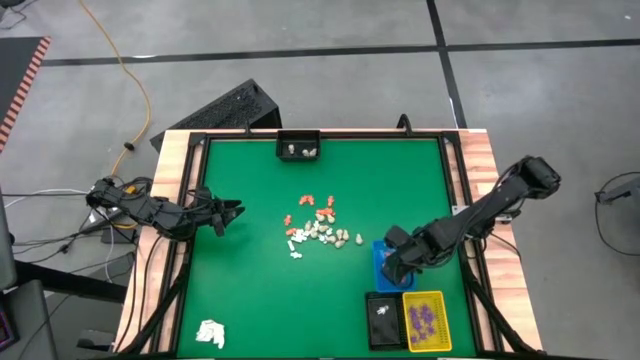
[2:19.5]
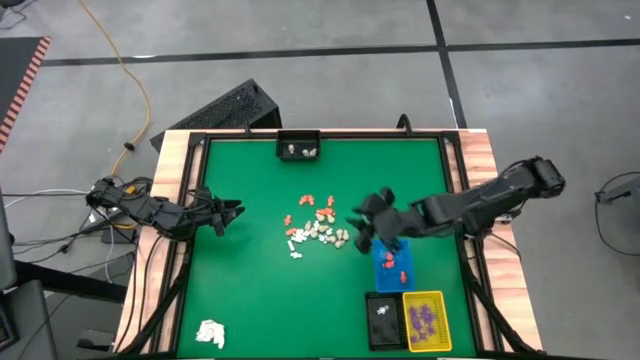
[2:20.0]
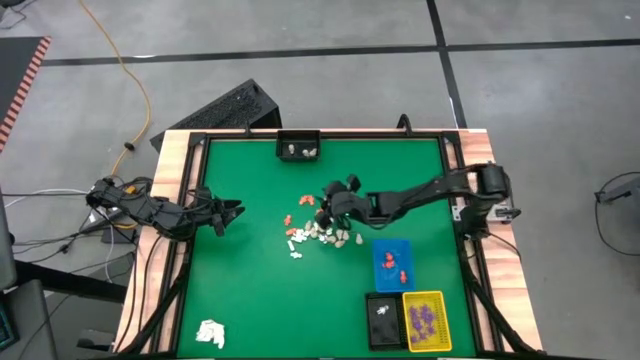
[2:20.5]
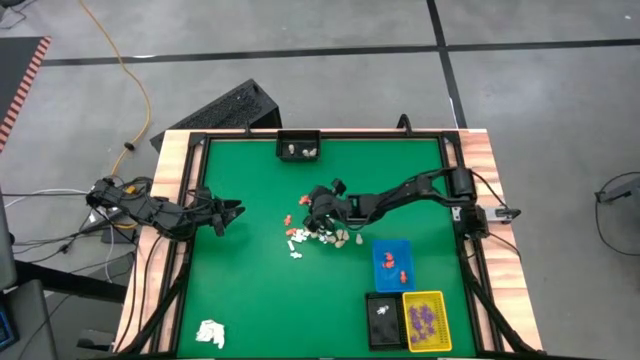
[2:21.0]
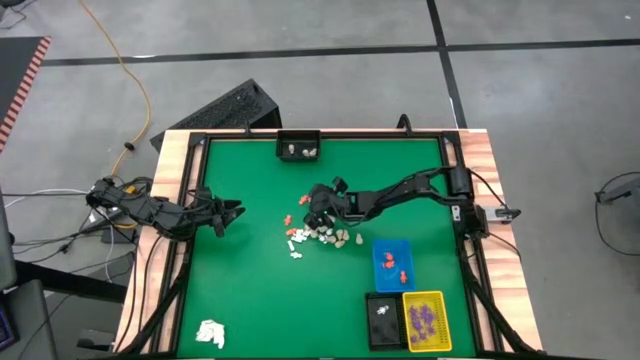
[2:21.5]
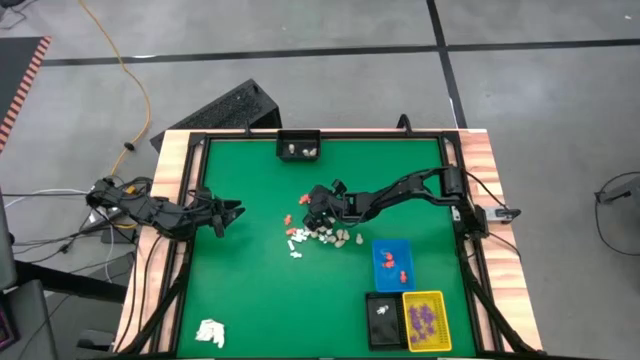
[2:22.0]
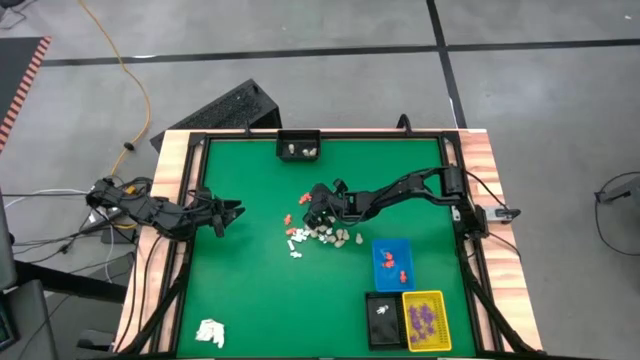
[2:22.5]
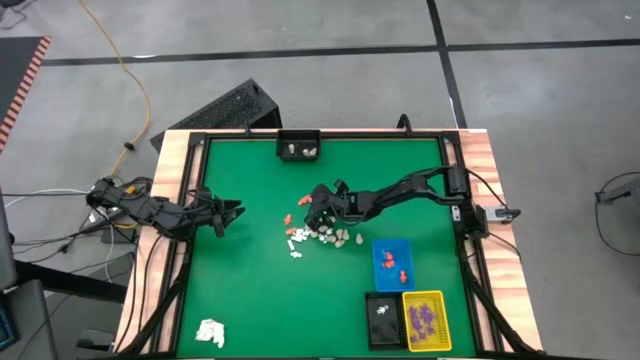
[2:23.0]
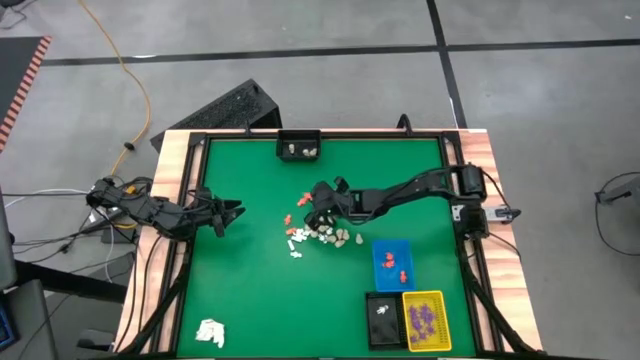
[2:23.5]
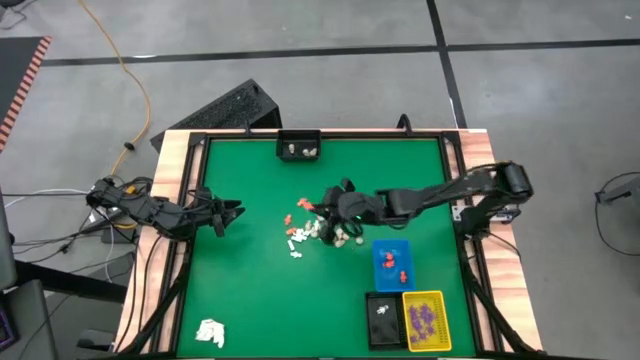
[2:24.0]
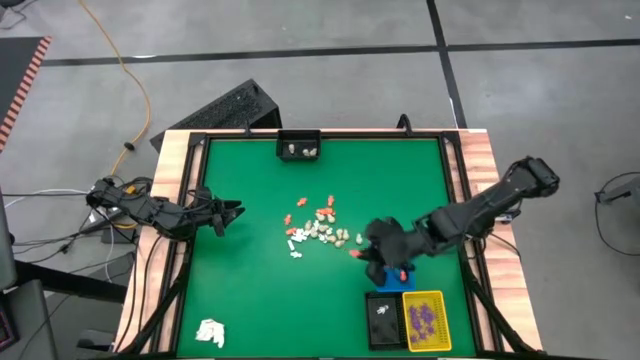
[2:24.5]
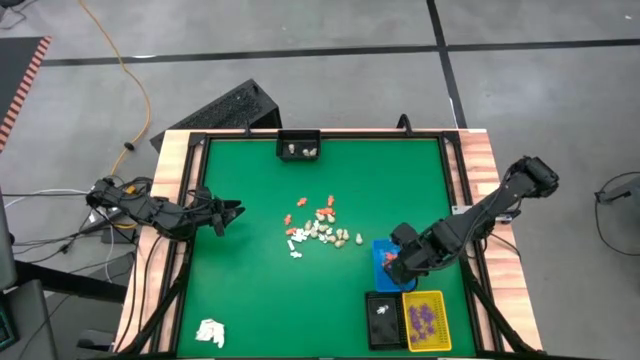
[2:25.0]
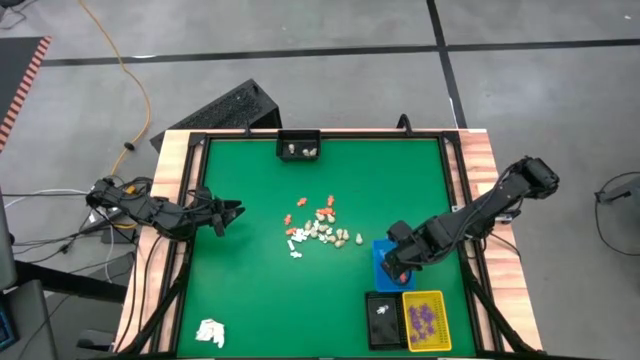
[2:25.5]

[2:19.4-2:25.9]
Task: Sort Halloween decoration
Put the orange skeleton toy into the blue bin

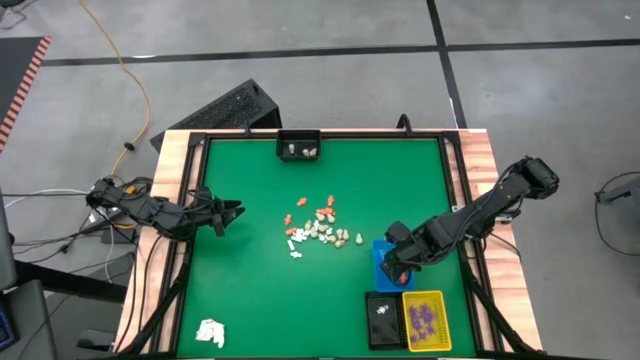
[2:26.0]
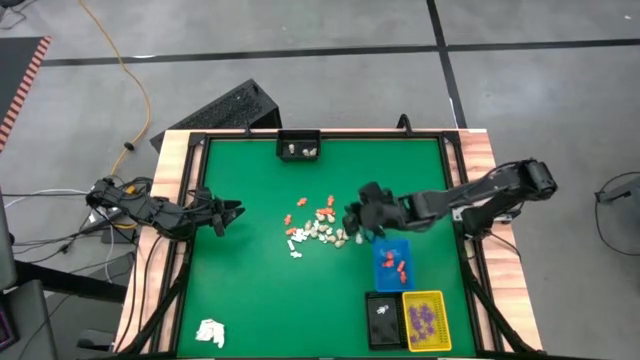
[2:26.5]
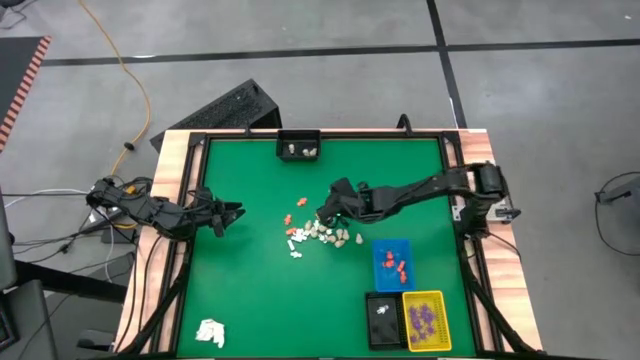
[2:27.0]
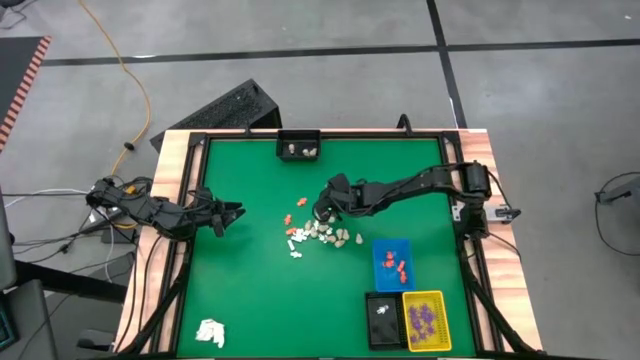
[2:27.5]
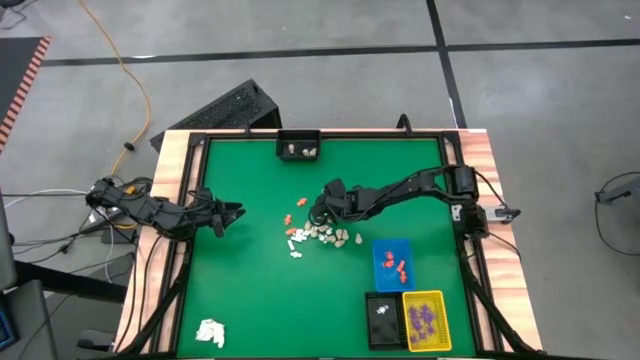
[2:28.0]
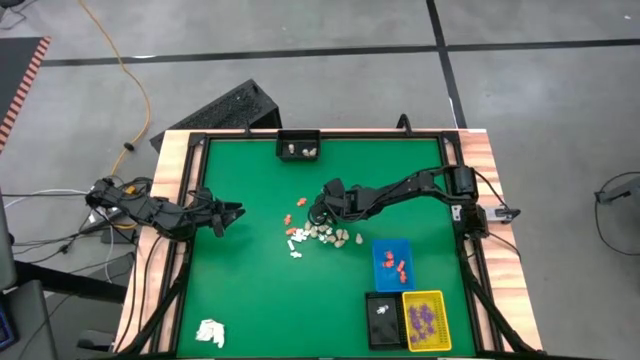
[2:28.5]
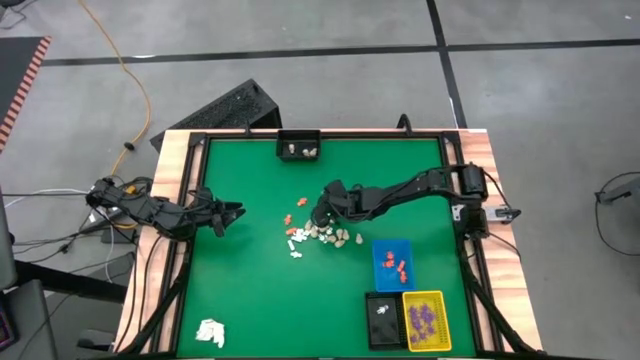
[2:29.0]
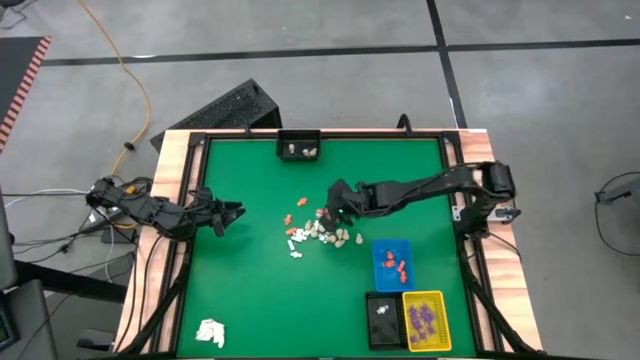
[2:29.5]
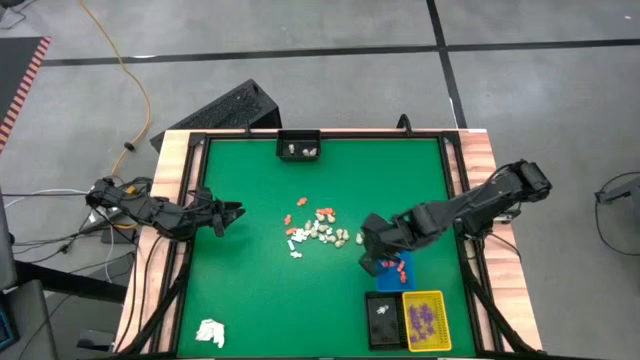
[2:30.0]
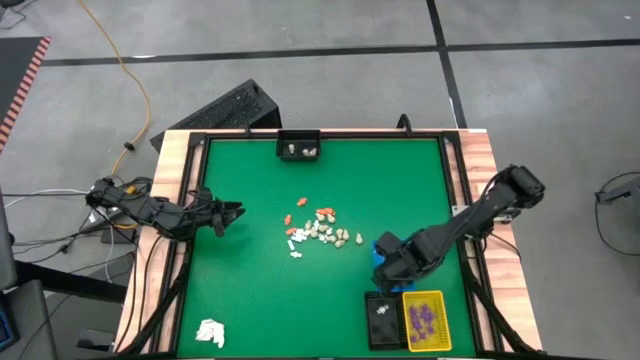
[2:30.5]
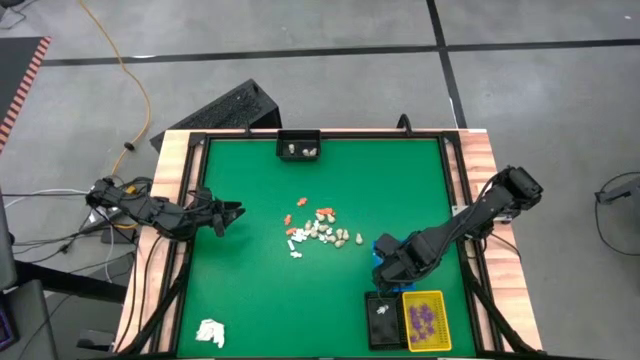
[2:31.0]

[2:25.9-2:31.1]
Put the orange skeleton toy into the blue bin

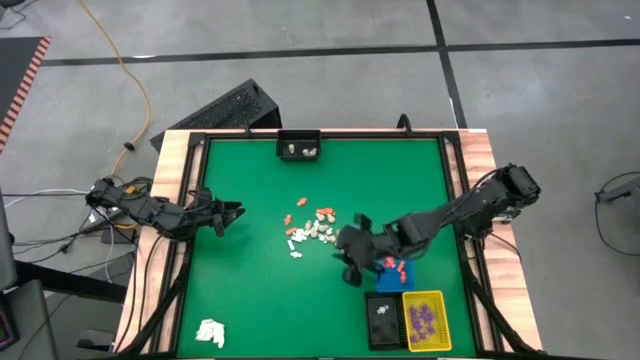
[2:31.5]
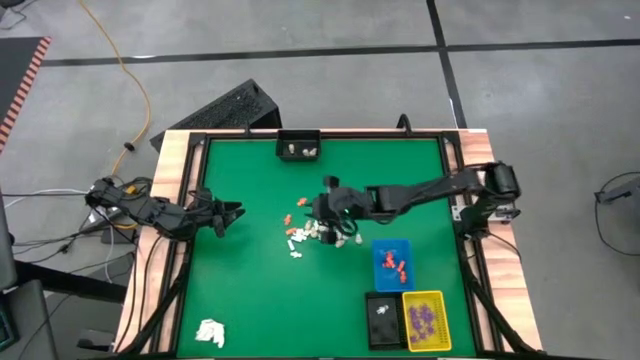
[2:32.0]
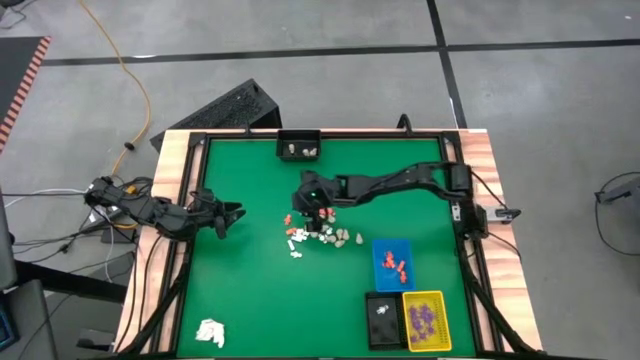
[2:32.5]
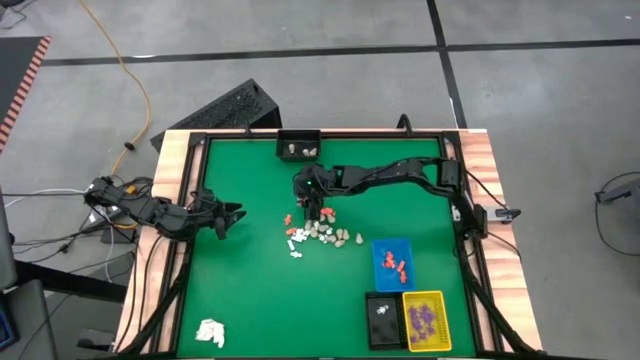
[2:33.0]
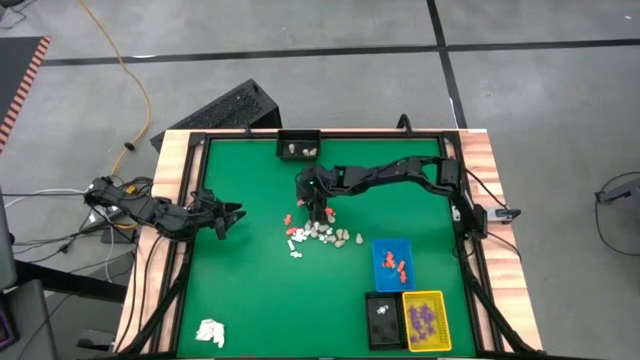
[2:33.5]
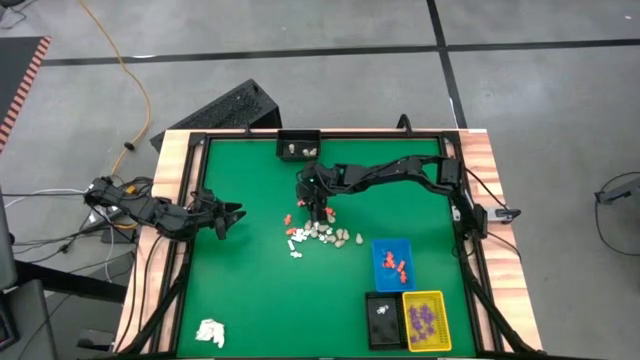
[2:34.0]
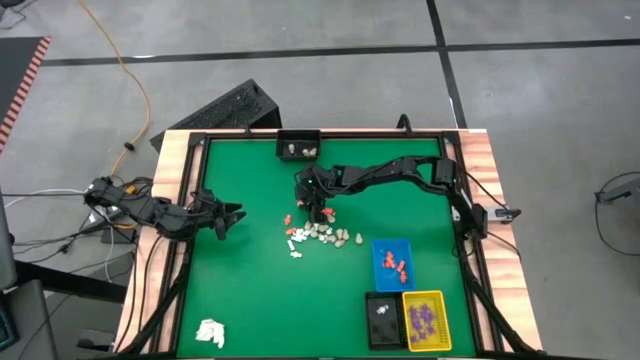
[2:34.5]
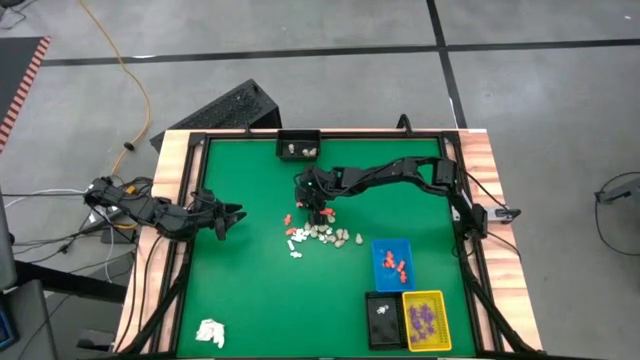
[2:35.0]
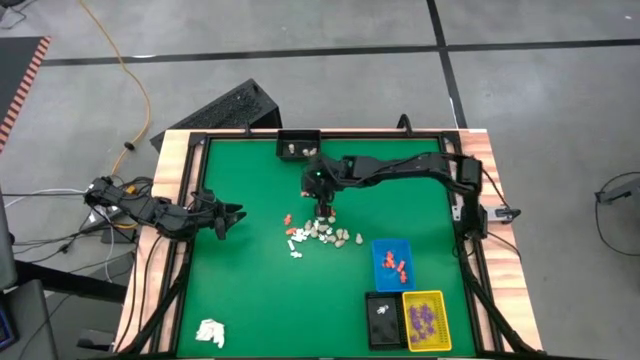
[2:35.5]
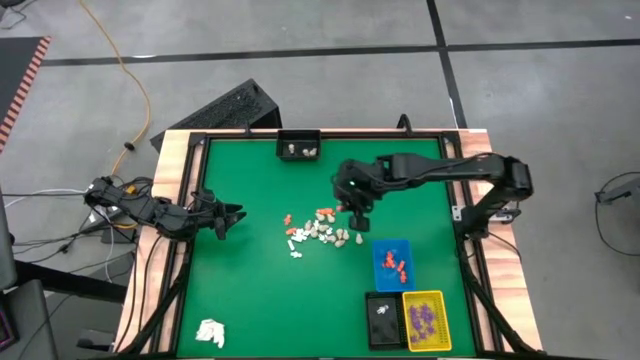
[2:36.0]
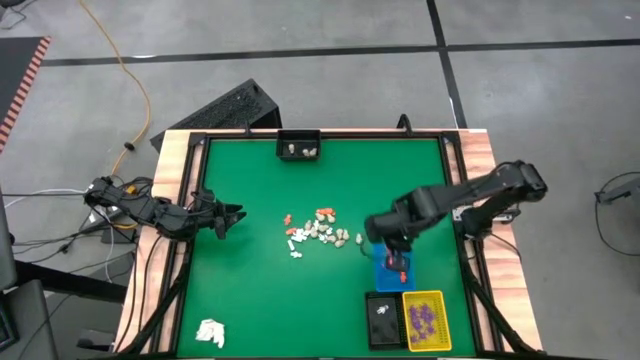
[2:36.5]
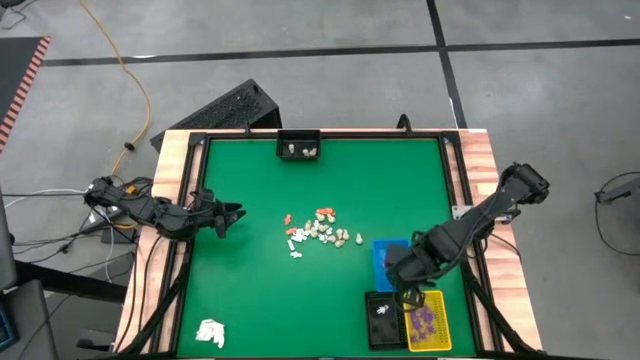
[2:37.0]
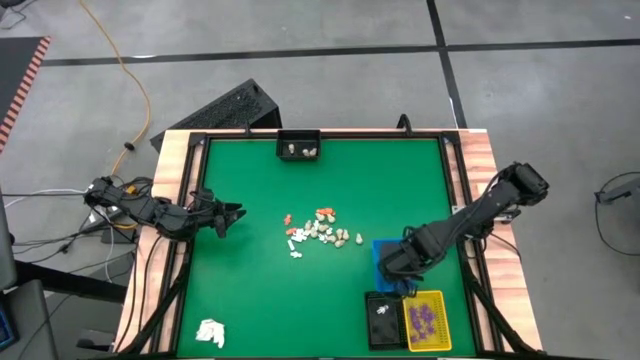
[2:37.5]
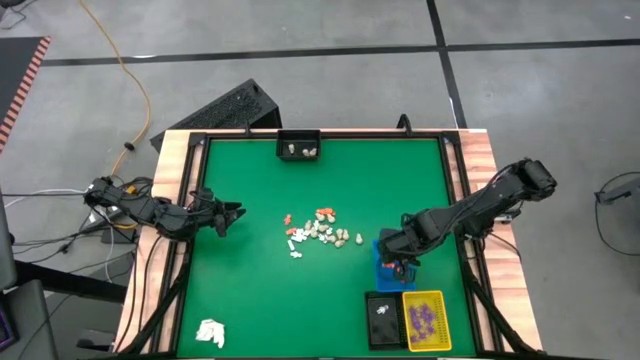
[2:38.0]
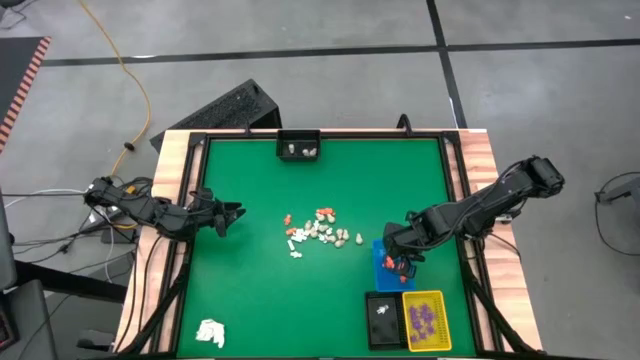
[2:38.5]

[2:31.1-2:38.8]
Put the orange skeleton toy into the blue bin

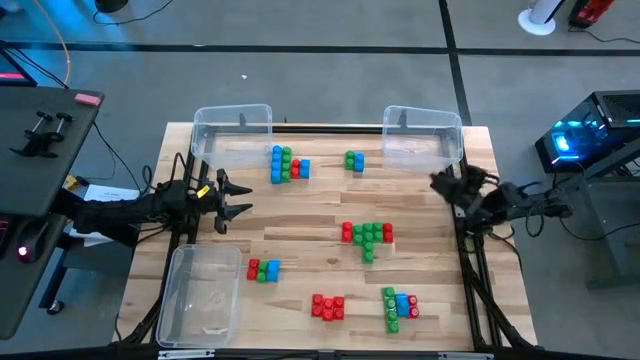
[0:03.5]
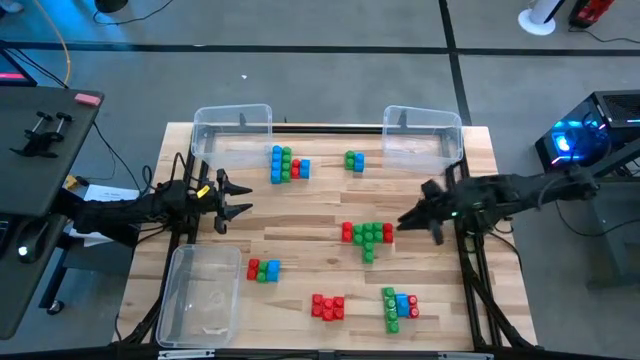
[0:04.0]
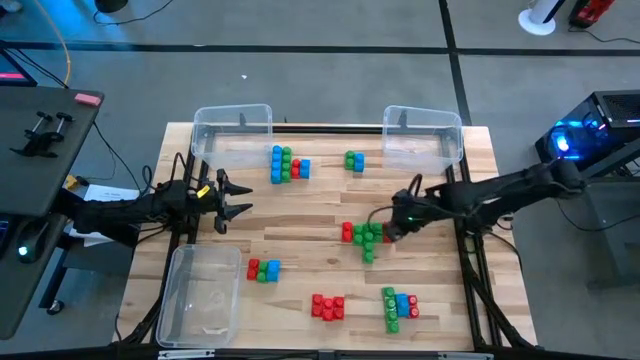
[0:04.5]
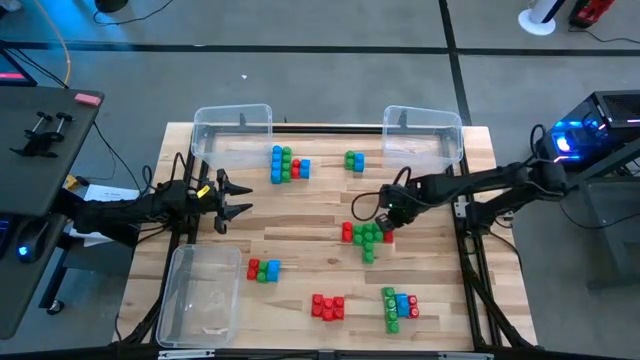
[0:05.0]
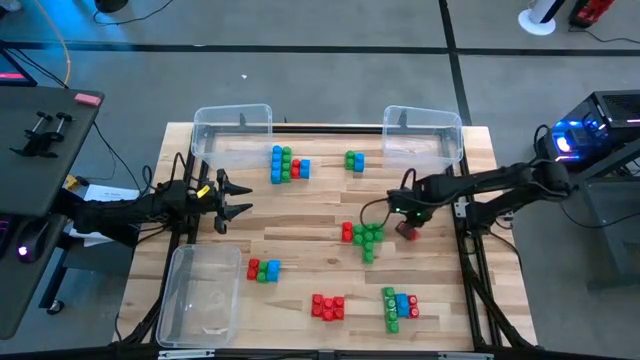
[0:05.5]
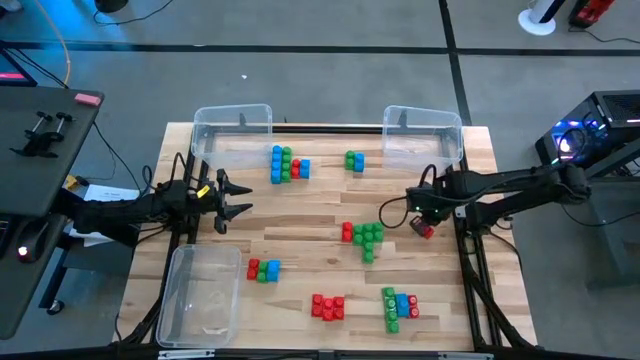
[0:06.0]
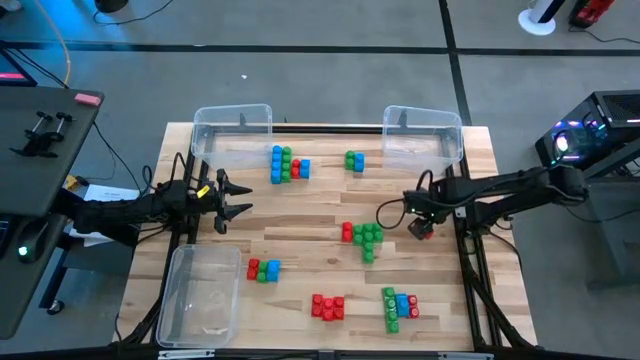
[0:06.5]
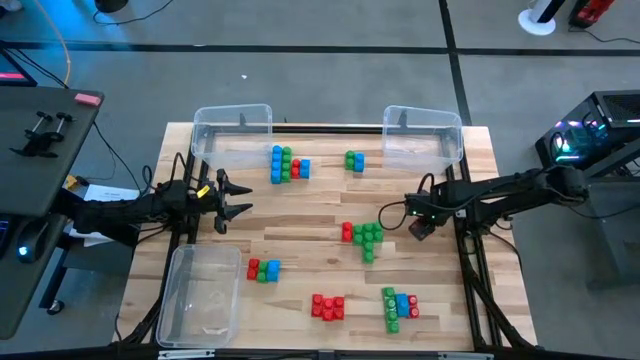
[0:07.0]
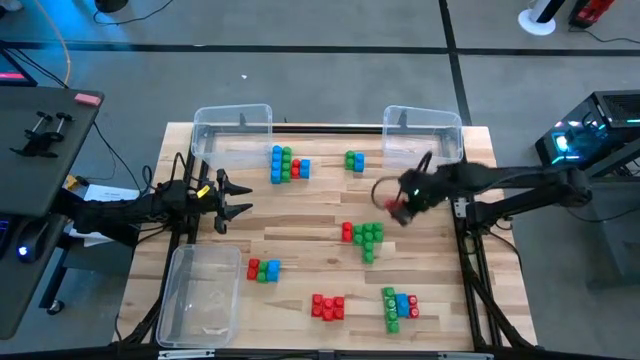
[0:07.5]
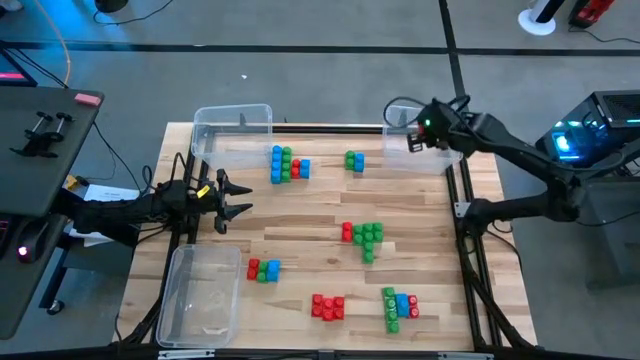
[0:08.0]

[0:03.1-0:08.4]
Task: Sort blocks
Put the red game piece into the top right transparent bin
